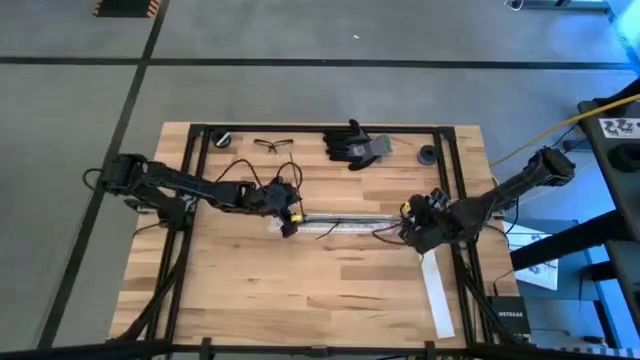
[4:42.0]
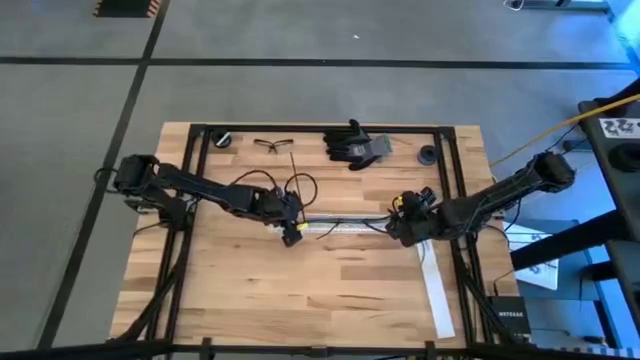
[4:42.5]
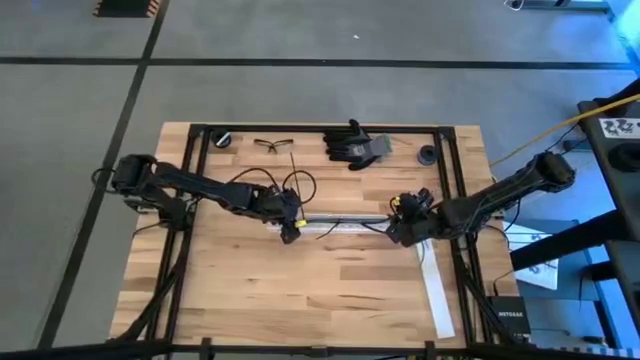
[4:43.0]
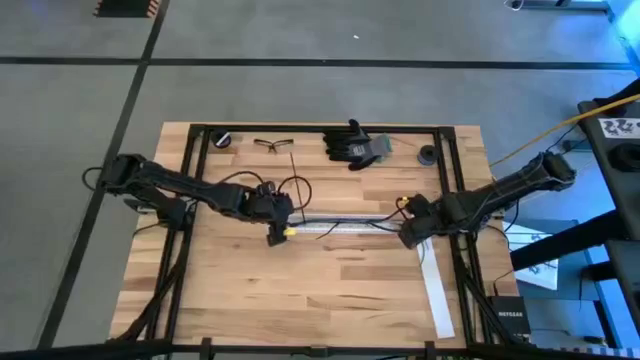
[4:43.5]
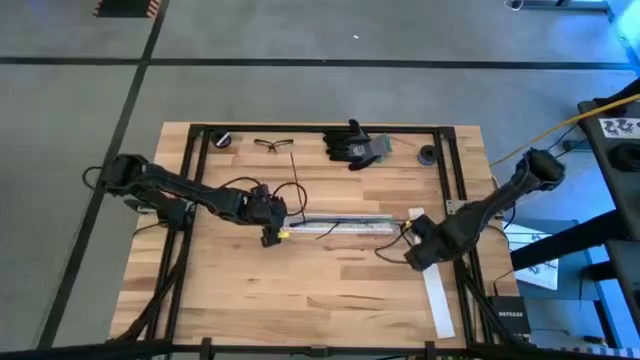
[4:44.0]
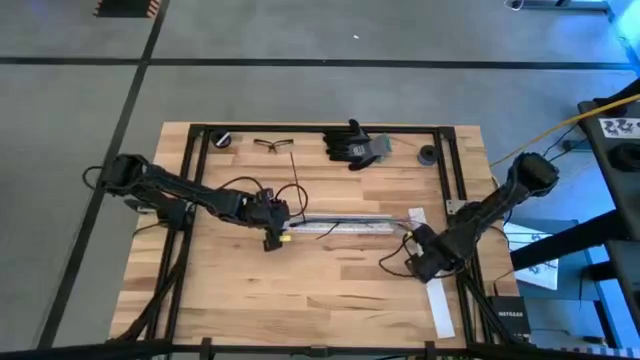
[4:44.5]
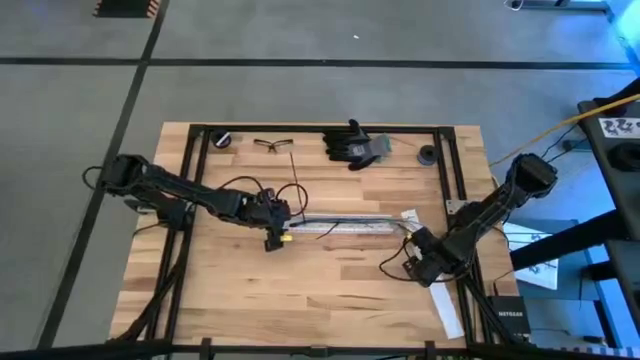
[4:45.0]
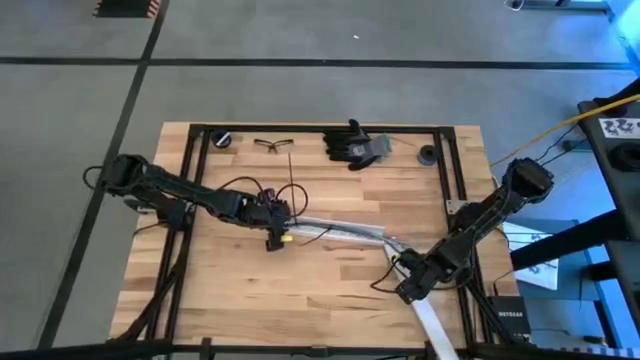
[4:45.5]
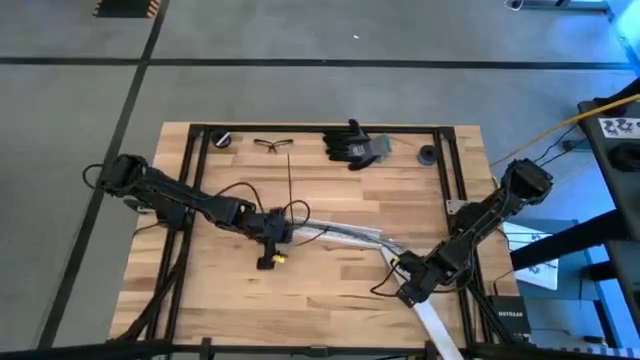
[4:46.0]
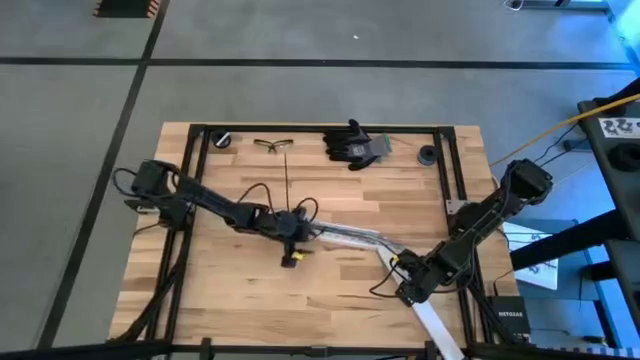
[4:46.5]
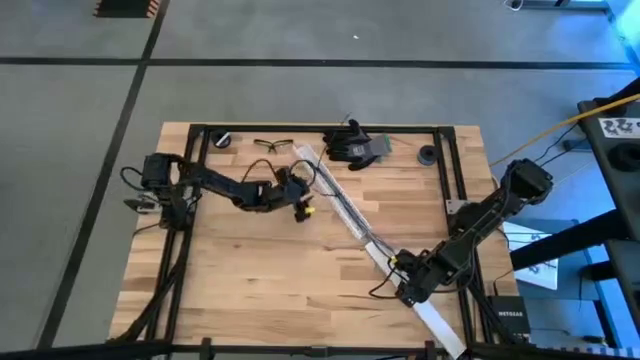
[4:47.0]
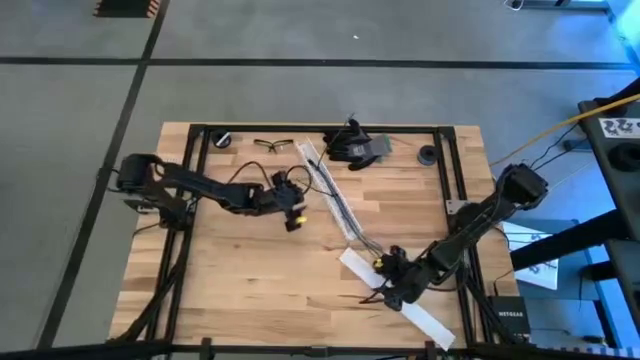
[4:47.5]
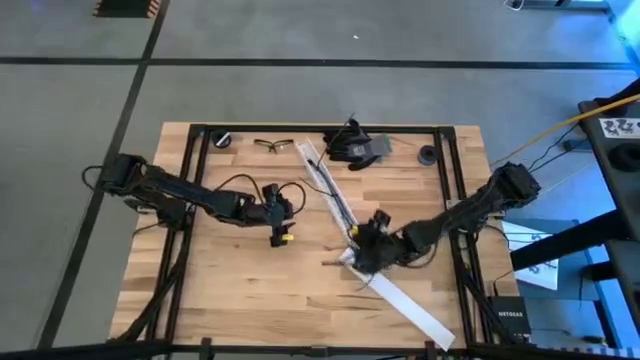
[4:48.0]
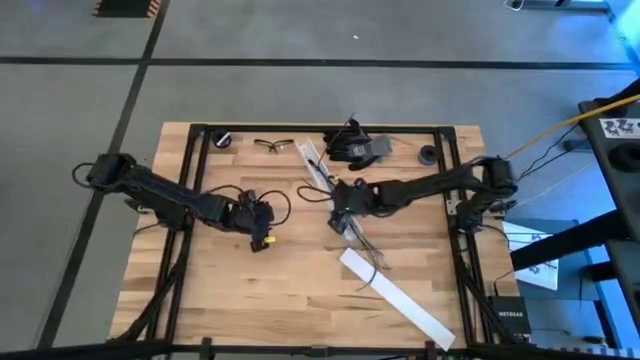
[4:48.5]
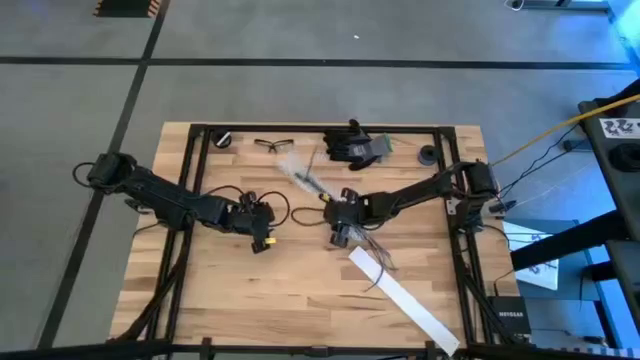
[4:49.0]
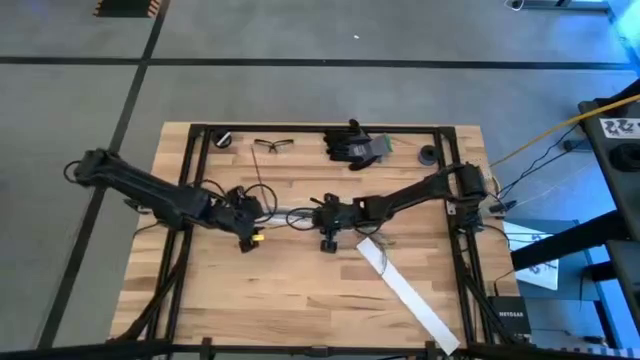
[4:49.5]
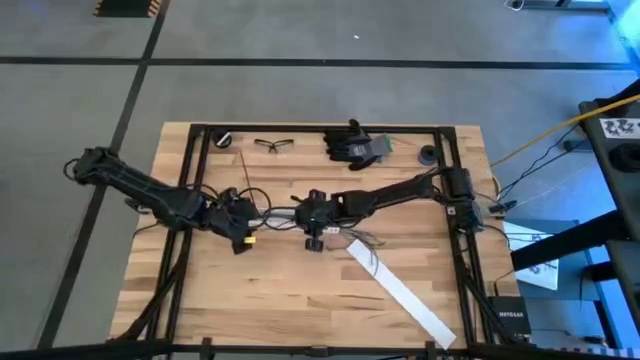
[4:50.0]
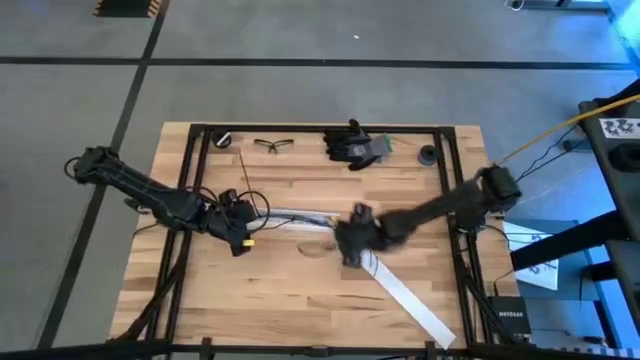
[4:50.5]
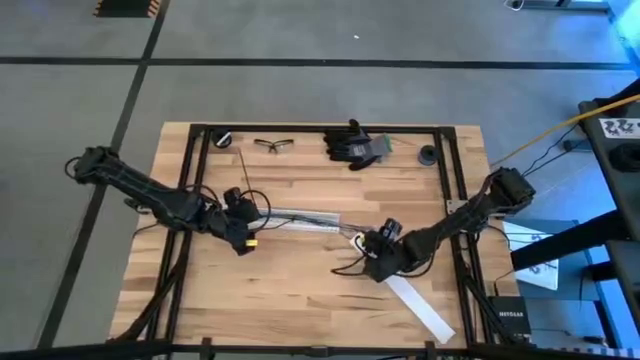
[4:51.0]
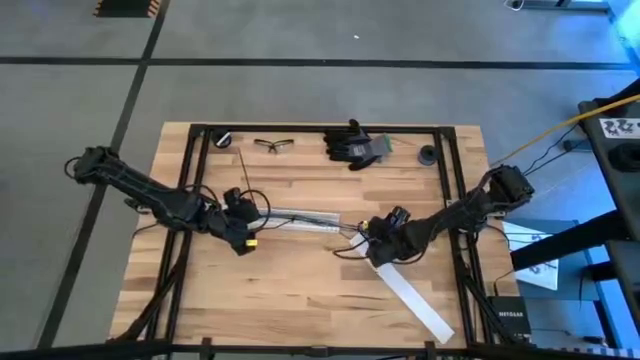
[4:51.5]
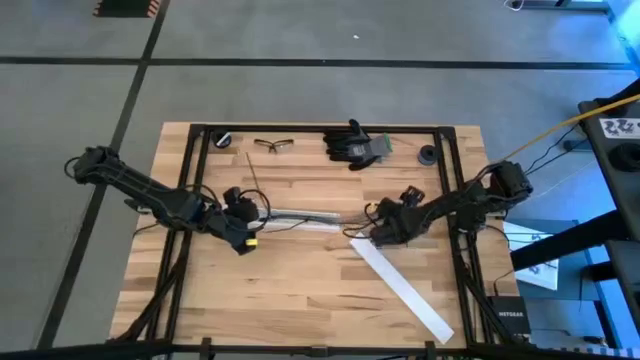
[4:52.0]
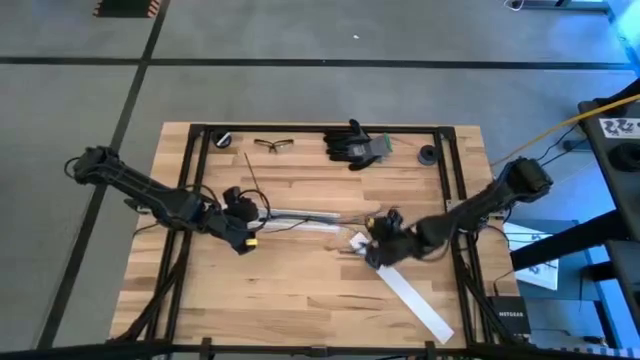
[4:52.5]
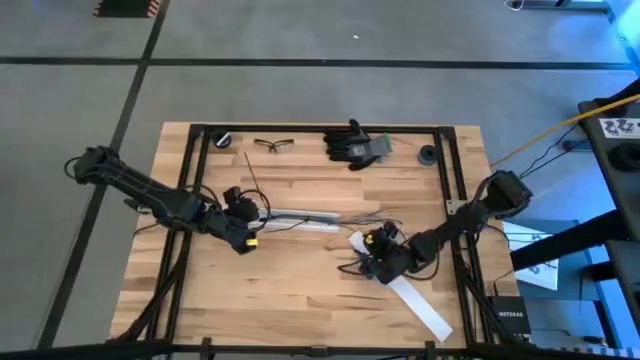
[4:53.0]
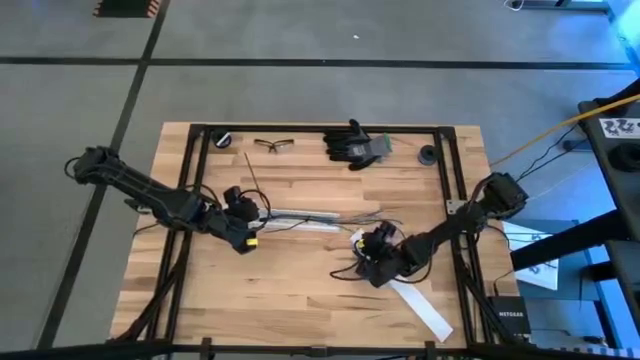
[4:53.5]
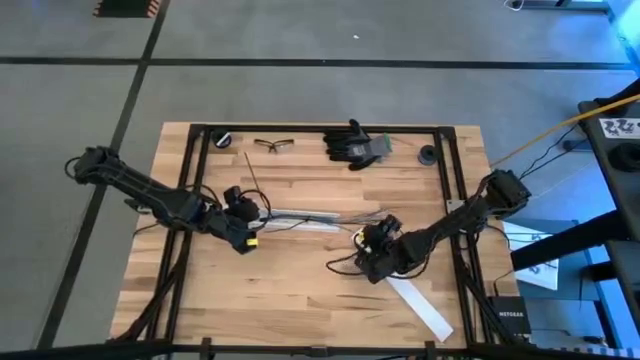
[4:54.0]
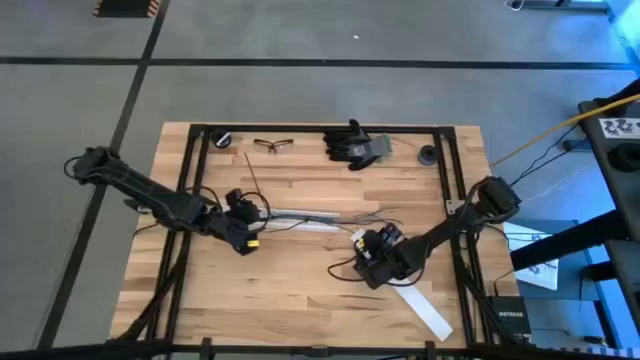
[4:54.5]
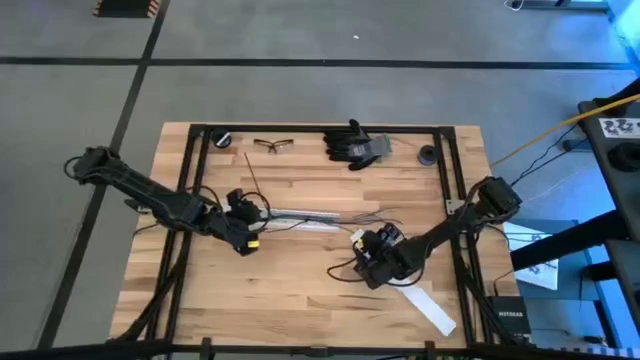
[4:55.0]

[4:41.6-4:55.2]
Task: Ziptie cables
Close the white cable duct

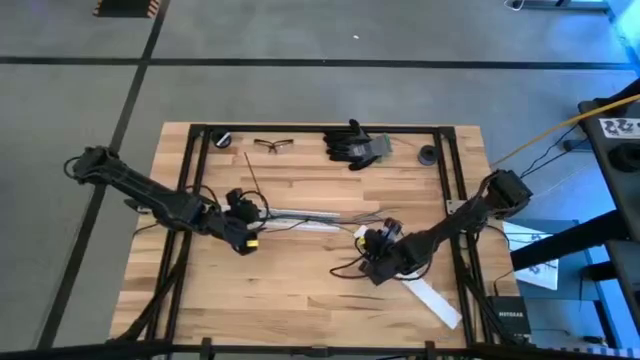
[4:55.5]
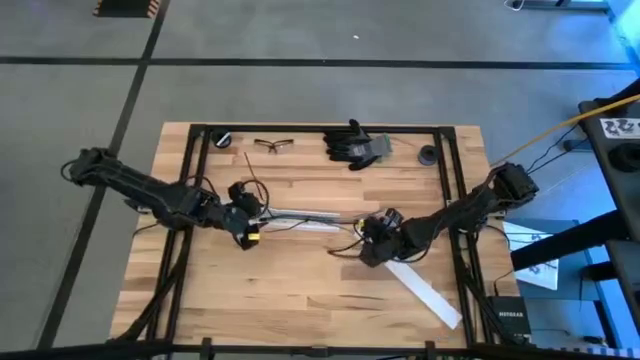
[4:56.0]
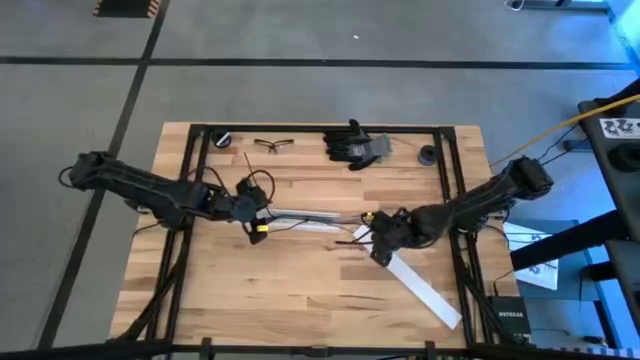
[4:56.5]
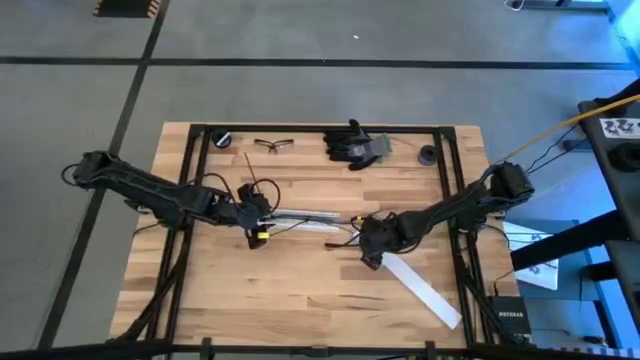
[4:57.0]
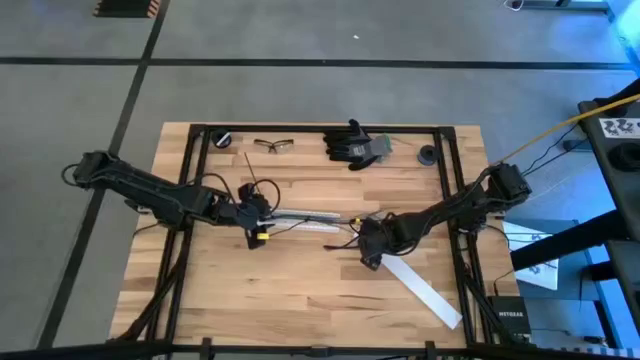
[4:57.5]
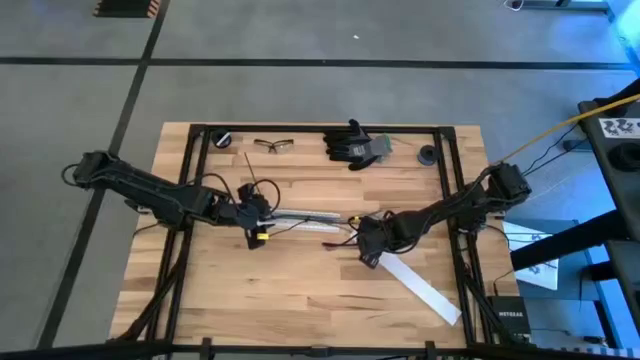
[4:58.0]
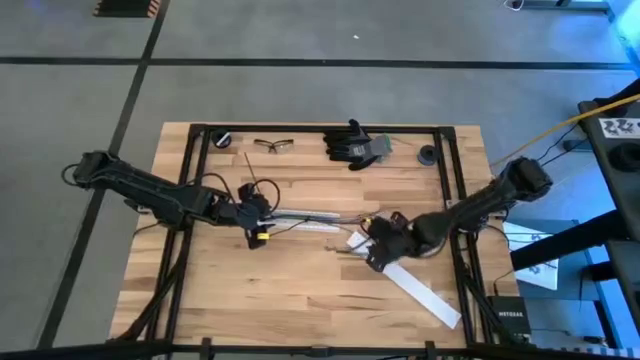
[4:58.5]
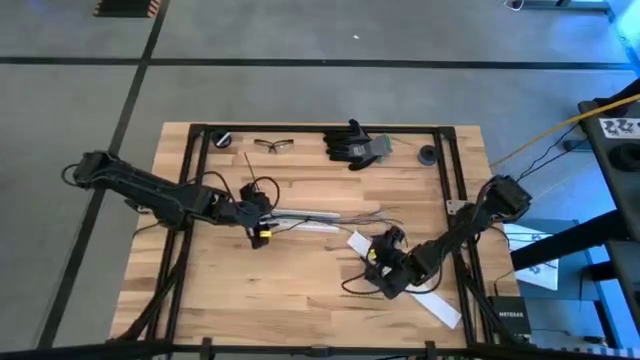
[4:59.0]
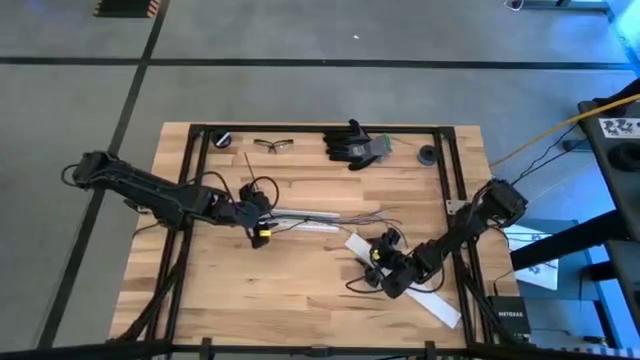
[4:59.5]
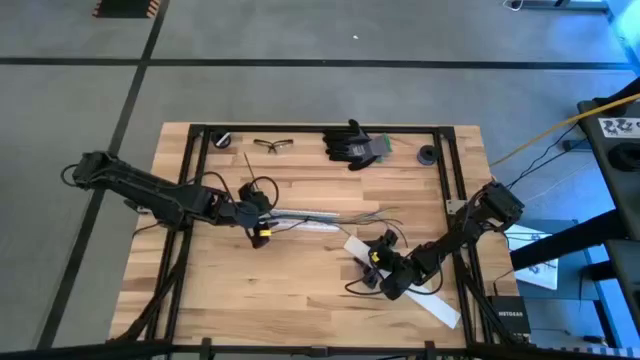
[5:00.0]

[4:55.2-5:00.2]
Close the white cable duct

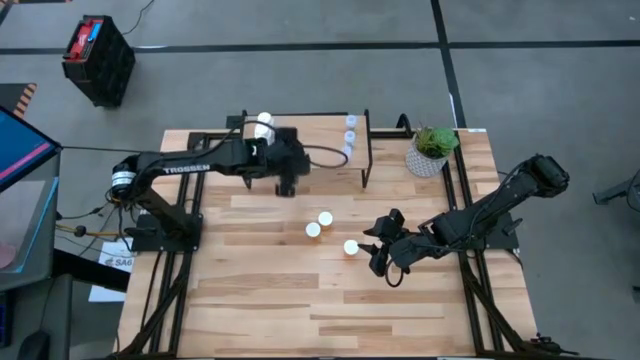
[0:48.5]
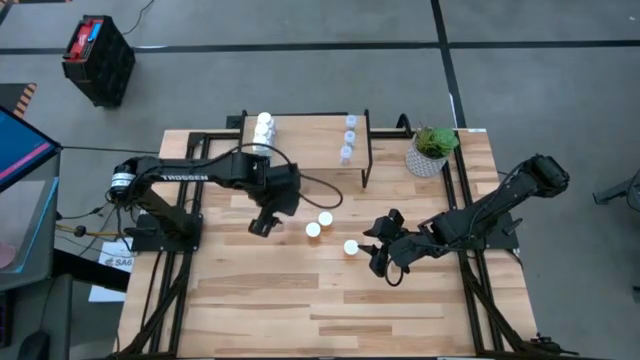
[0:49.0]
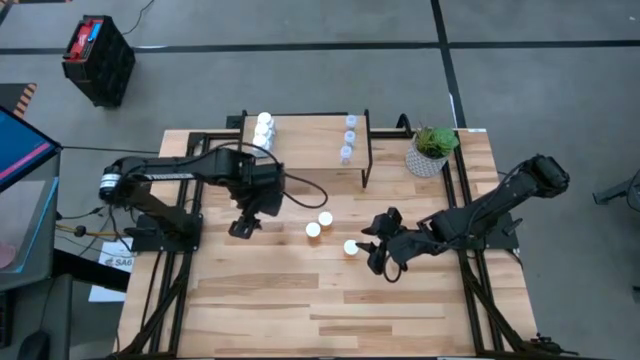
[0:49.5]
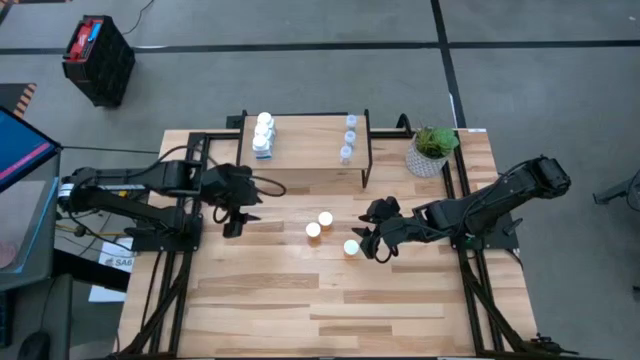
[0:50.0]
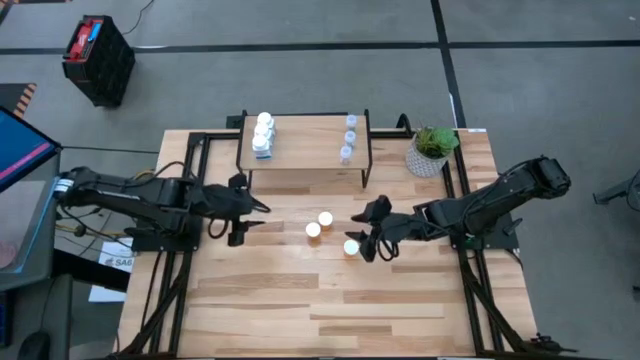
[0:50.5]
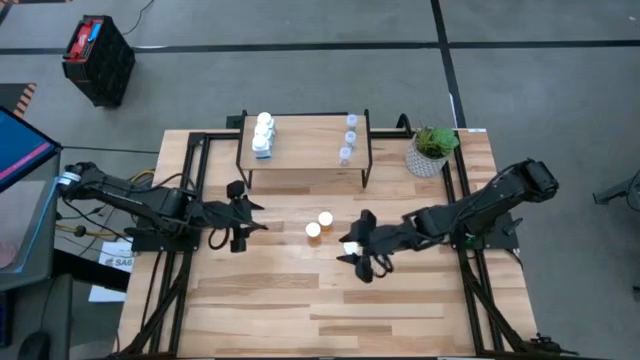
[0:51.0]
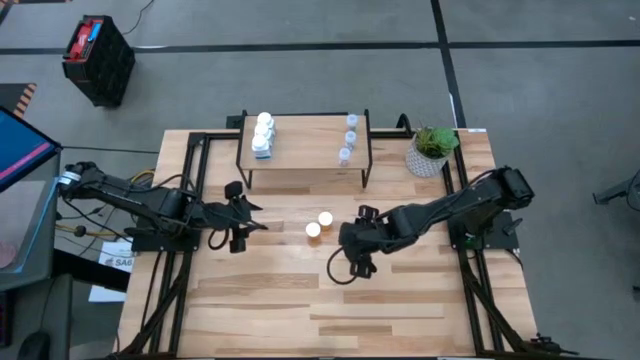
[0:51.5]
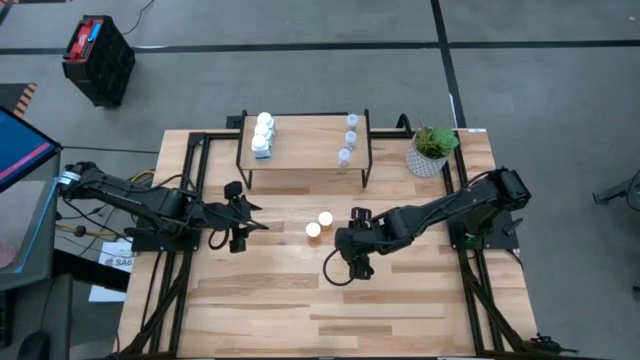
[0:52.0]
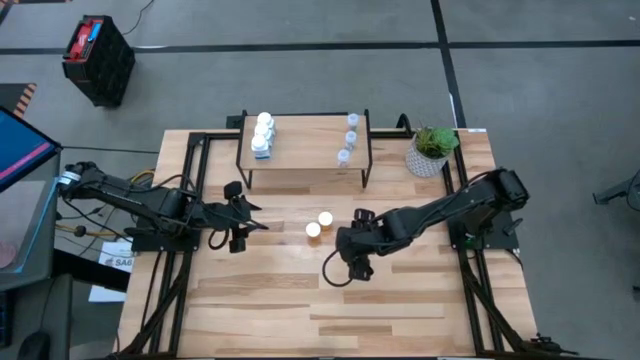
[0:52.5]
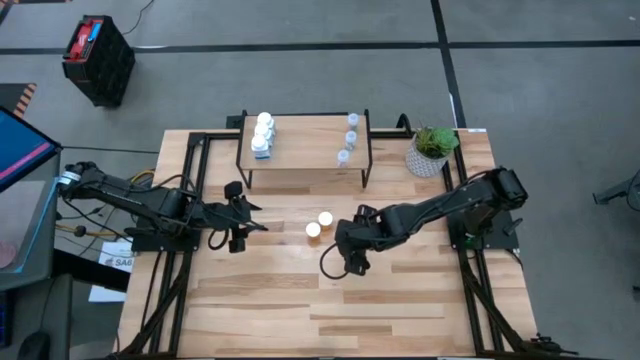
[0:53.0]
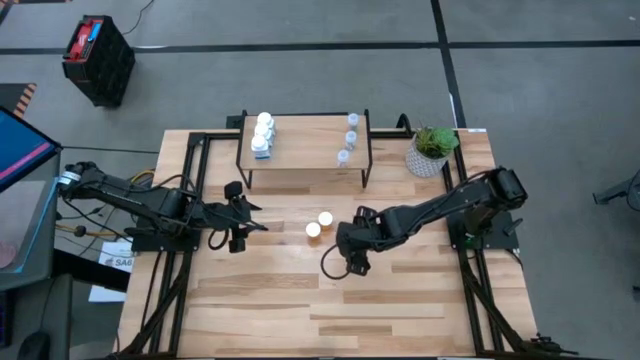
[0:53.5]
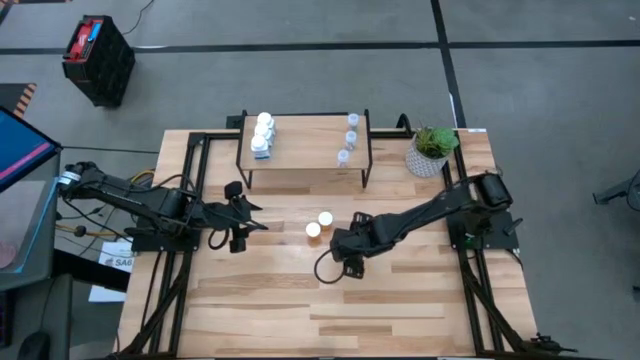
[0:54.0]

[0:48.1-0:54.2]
Task: Pick and place medicine bottles onto shelf by color
Put the bottom orange pill bottle on the shelf
